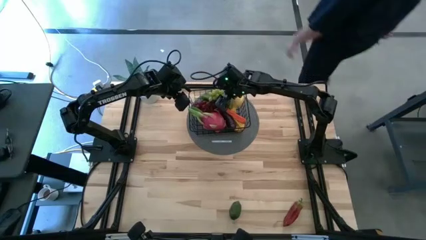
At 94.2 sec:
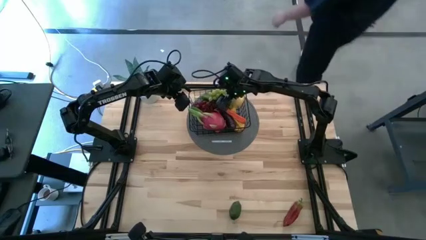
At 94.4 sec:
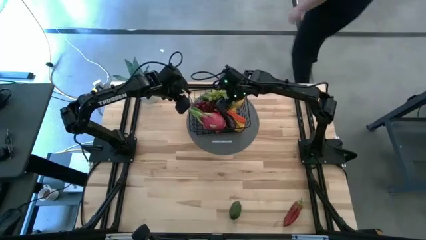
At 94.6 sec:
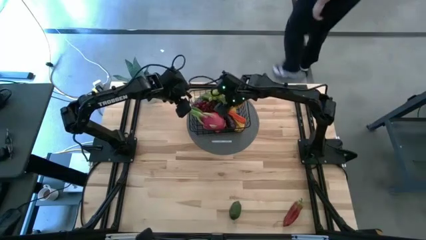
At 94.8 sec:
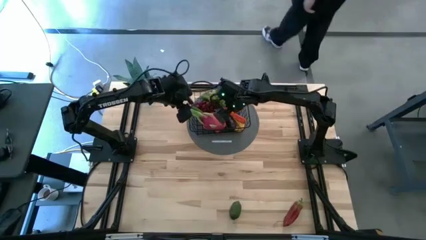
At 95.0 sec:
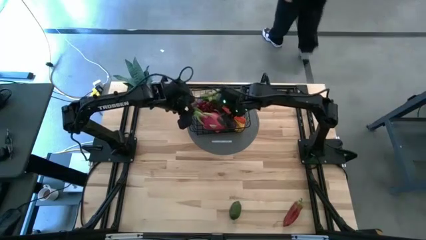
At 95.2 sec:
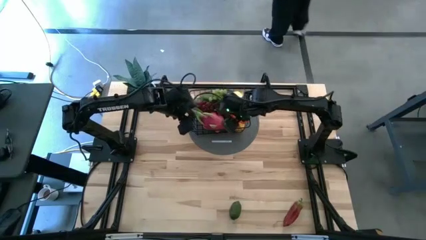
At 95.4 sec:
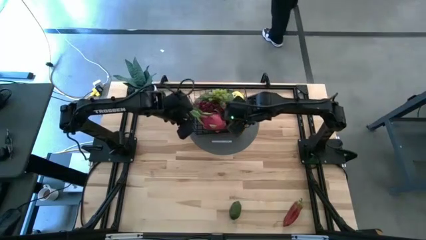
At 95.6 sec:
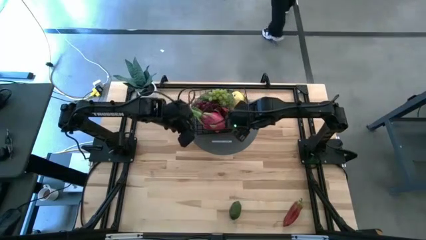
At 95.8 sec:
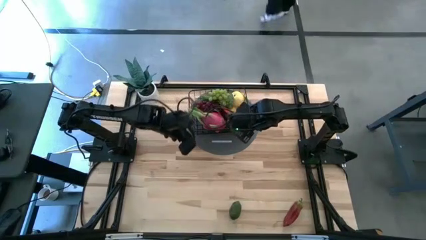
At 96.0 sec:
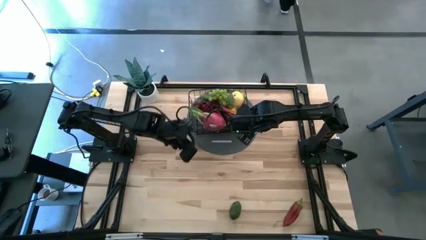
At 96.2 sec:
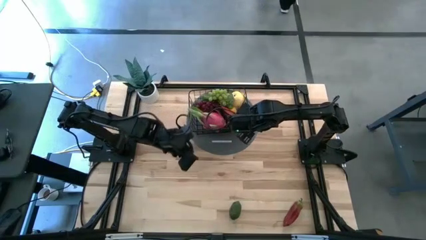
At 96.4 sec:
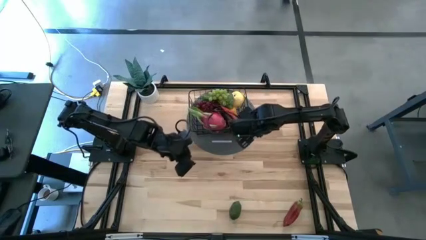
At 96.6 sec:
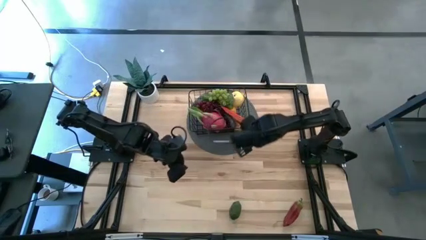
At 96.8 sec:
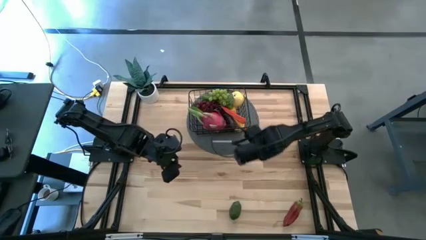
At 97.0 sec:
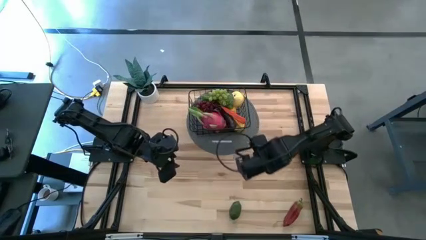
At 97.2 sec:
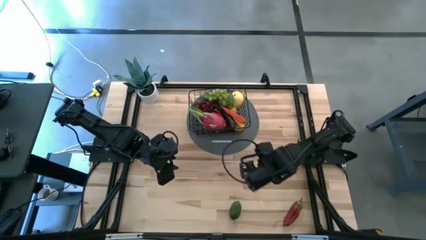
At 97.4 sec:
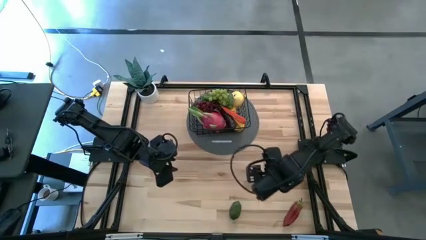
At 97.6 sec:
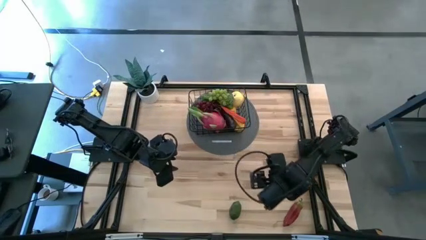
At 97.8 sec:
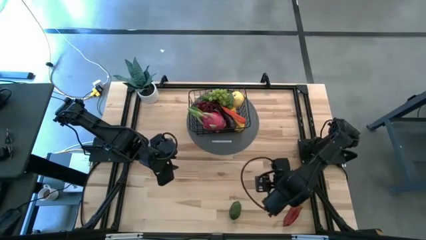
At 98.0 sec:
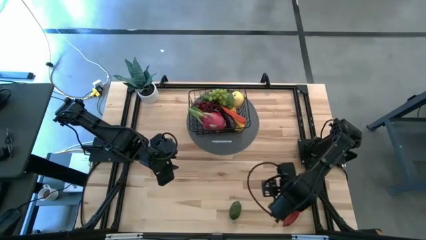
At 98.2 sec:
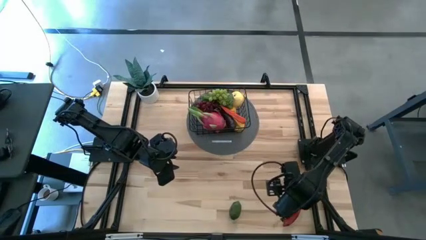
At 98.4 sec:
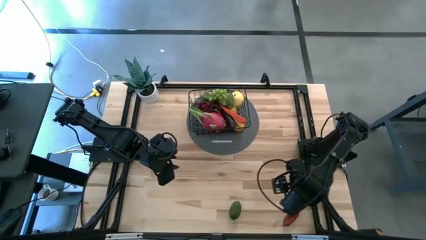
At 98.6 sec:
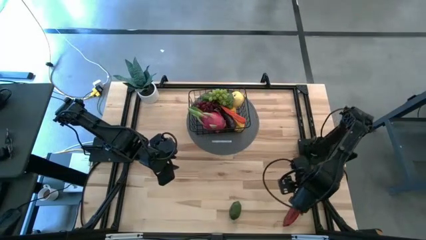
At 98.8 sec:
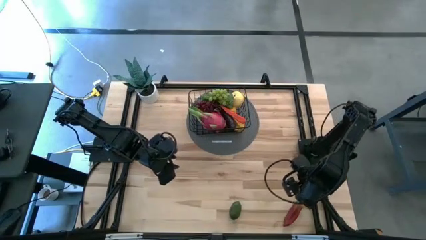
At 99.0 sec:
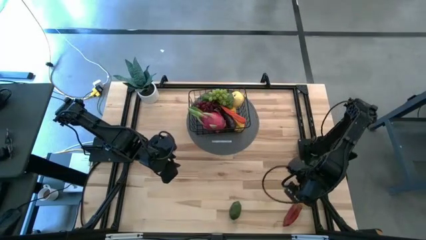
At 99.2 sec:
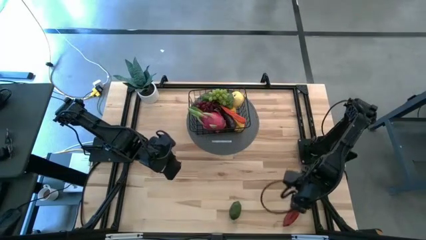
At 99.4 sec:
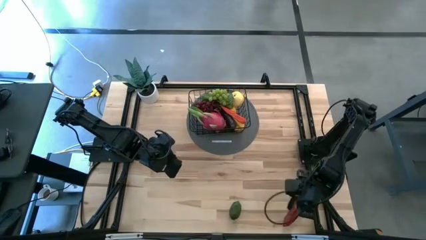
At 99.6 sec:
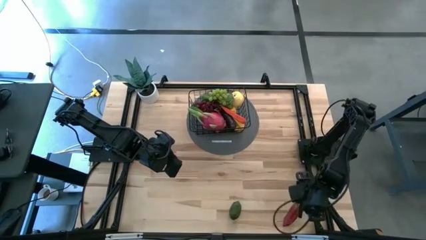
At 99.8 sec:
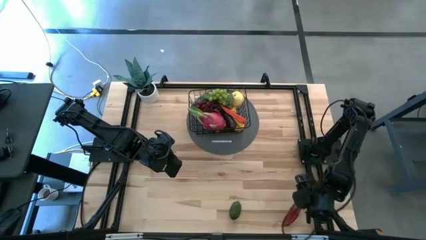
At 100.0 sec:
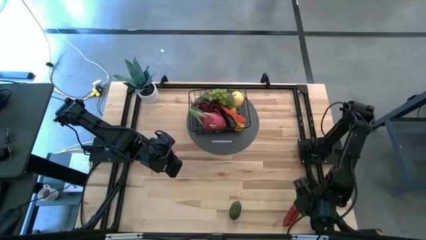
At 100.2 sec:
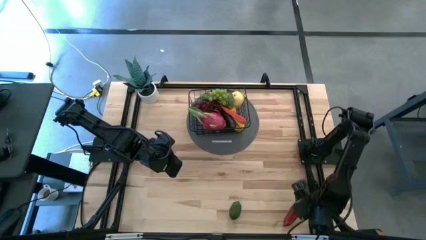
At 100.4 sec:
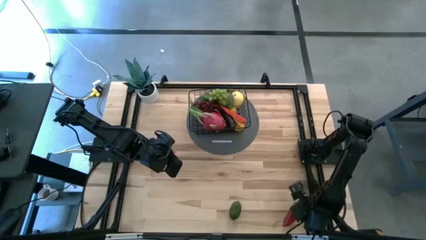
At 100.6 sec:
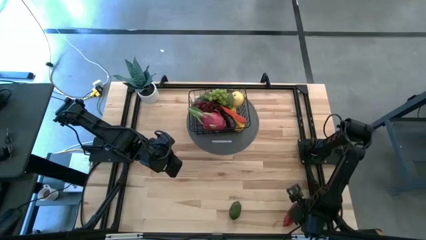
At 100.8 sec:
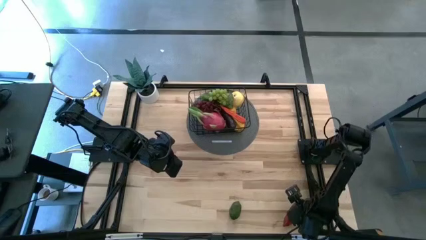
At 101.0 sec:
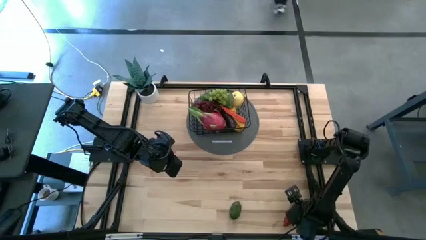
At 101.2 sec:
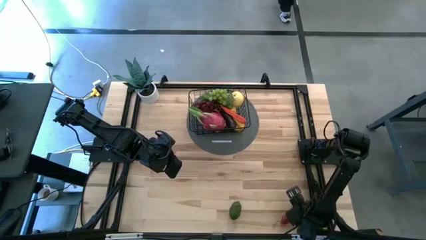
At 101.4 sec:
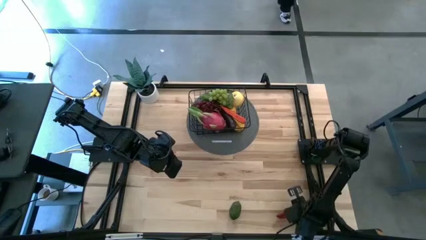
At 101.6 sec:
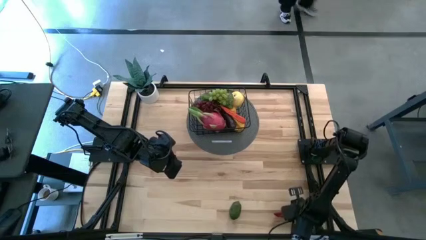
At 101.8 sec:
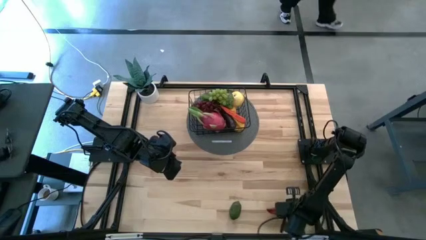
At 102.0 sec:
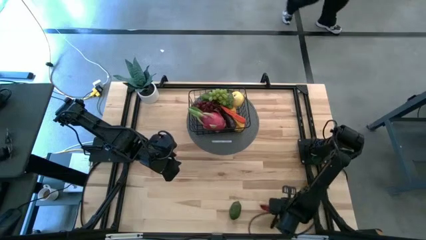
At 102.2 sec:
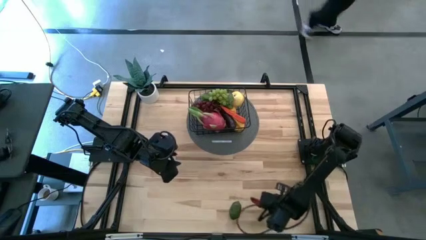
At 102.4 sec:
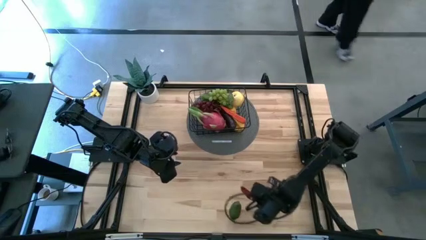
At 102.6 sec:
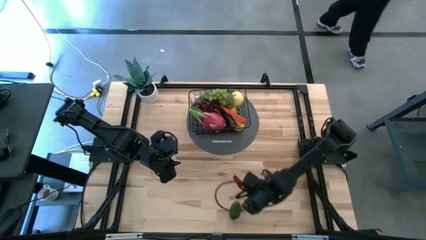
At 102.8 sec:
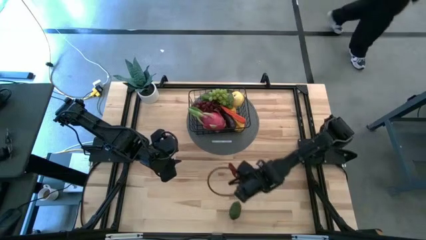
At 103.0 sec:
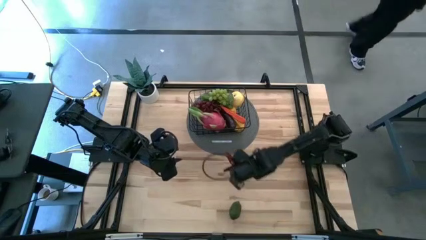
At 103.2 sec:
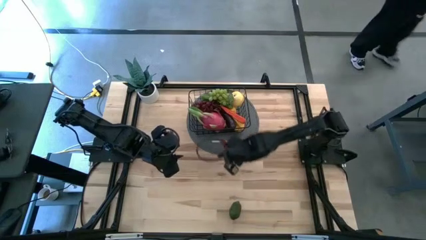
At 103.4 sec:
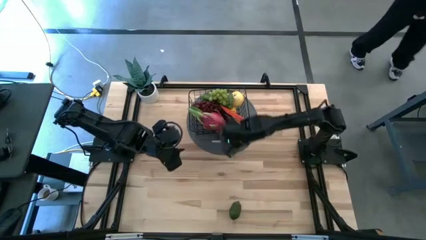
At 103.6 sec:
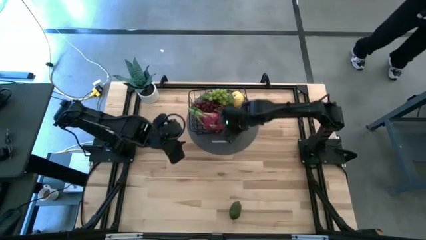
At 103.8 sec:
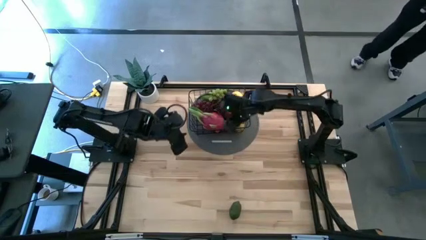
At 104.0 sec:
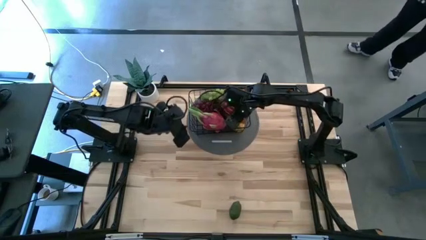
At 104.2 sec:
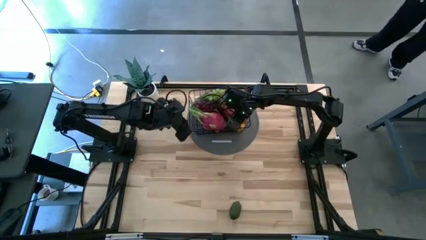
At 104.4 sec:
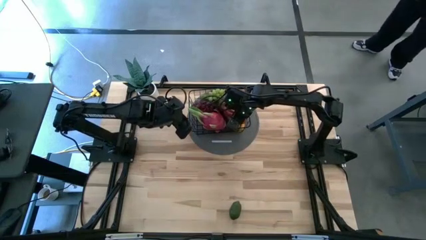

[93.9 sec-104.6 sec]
Task: Build produce basket
Put the red bell pepper into the wire basket

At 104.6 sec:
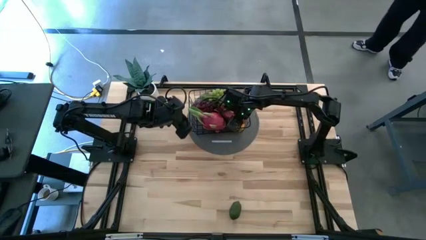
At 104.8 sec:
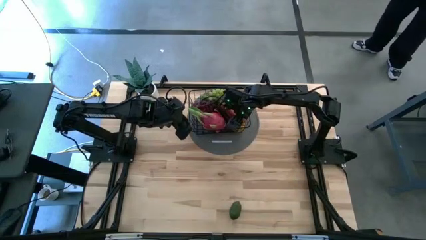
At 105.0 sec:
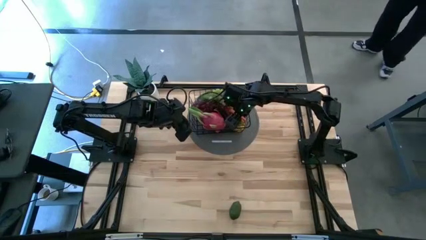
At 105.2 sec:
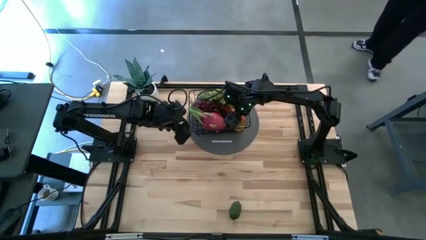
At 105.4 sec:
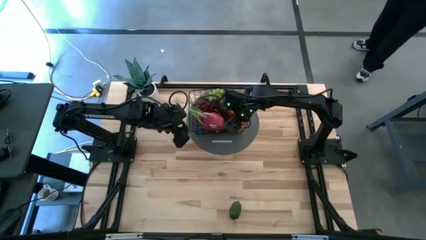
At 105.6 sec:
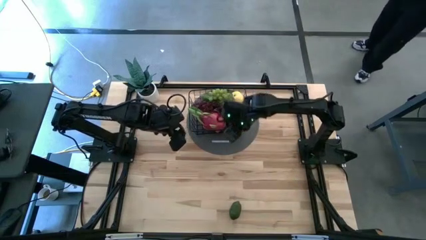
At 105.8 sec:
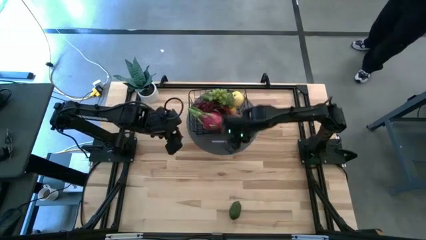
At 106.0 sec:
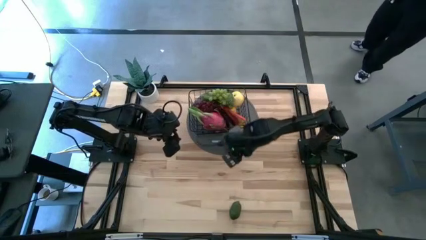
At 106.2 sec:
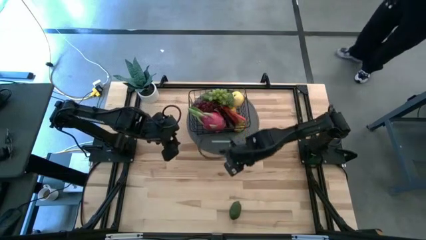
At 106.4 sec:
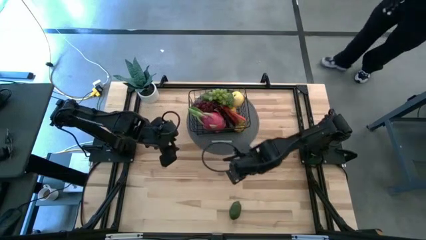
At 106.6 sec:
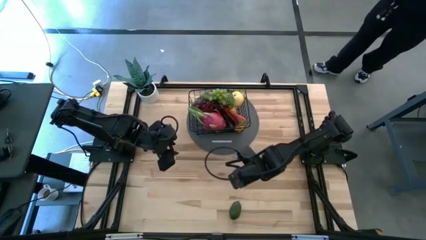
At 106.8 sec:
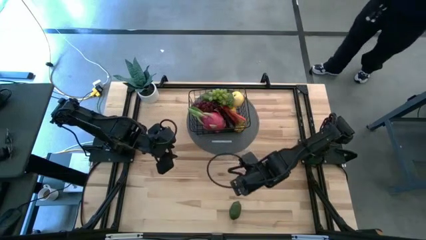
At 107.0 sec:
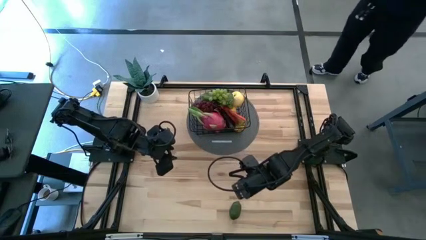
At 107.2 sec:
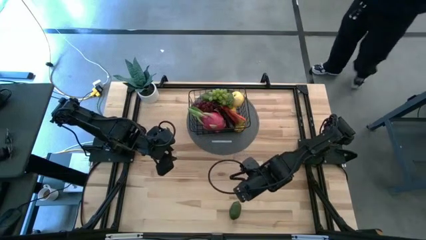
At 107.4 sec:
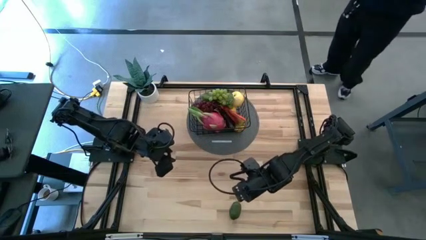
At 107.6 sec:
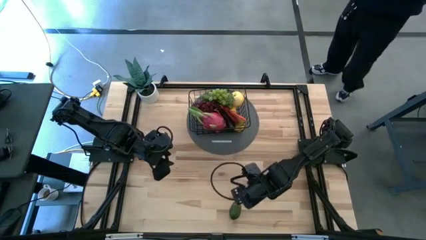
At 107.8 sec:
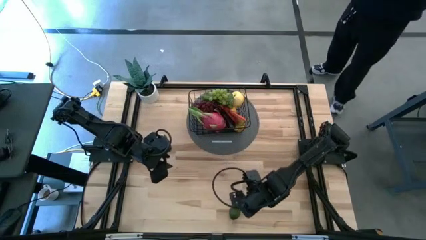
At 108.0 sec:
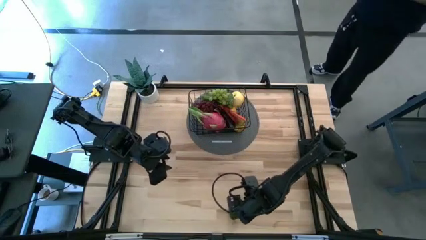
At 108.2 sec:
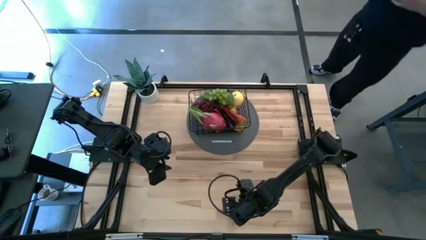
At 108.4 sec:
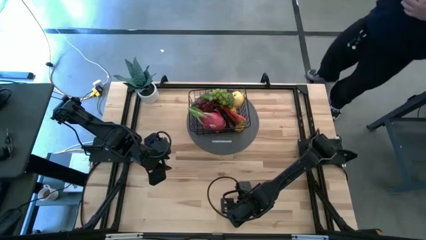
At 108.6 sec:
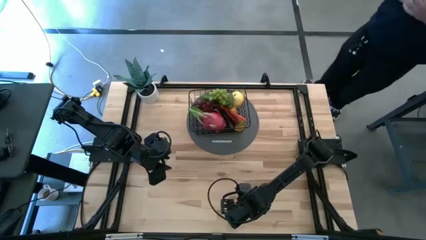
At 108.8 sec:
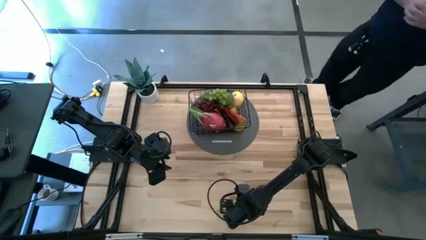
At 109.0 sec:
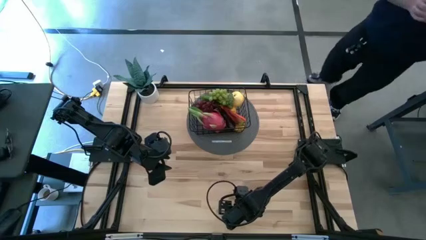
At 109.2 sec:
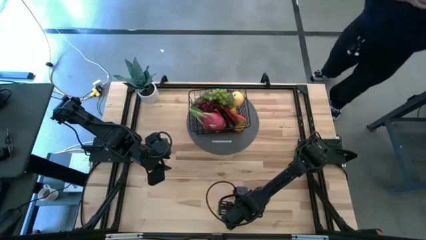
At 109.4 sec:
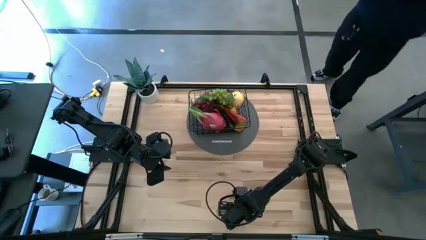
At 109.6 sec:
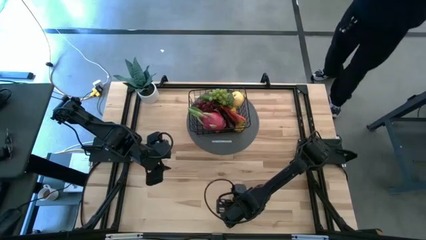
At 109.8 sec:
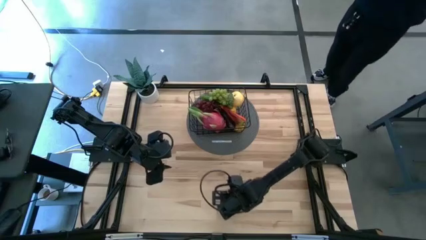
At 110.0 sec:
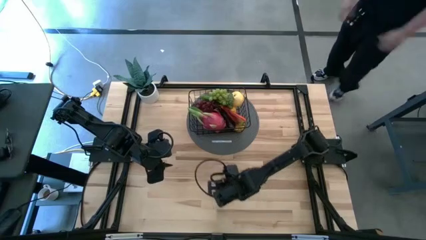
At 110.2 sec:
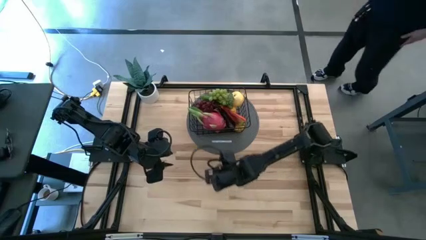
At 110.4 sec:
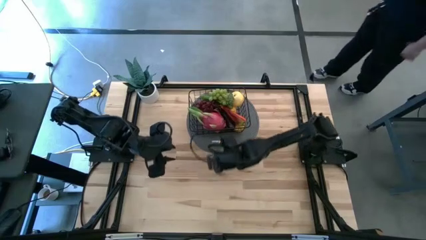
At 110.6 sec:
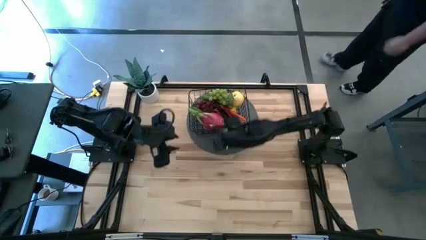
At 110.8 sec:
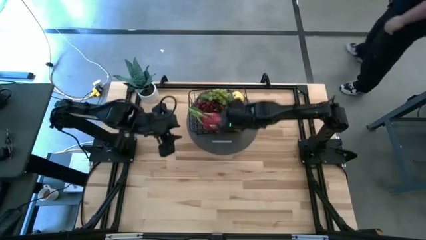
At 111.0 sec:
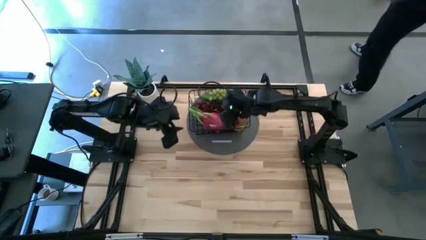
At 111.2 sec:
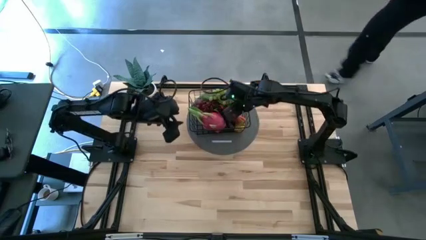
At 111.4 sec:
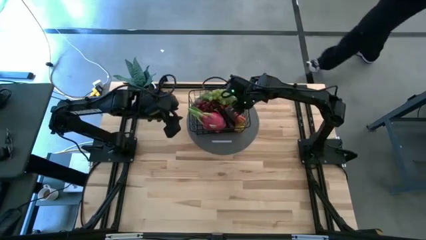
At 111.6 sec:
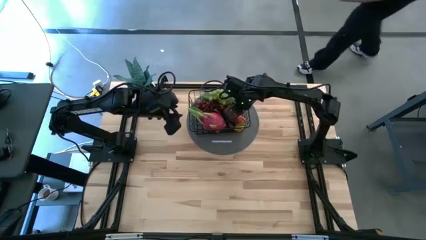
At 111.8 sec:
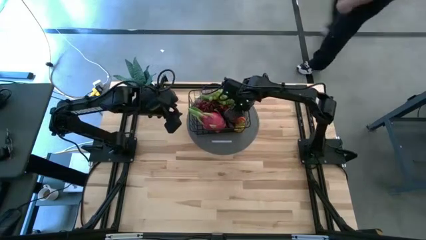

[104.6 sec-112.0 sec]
Put the lime into the wire basket
